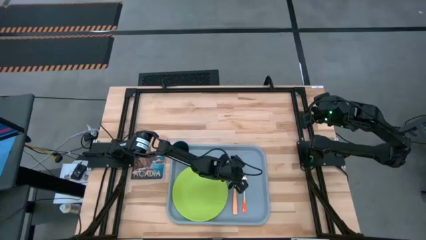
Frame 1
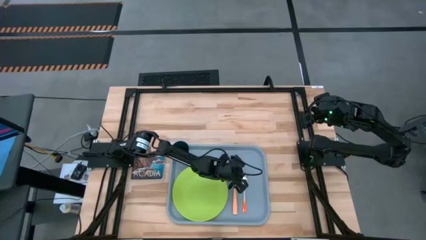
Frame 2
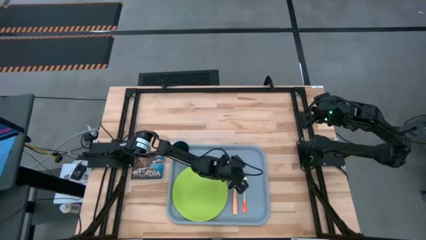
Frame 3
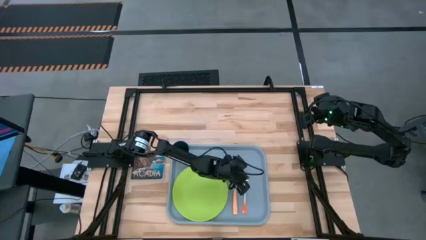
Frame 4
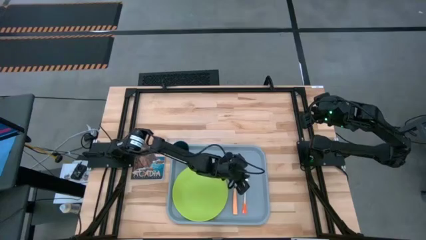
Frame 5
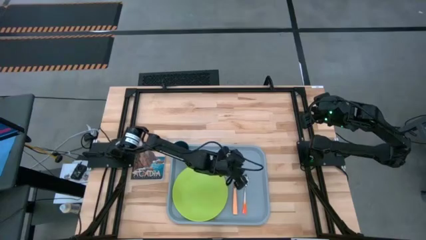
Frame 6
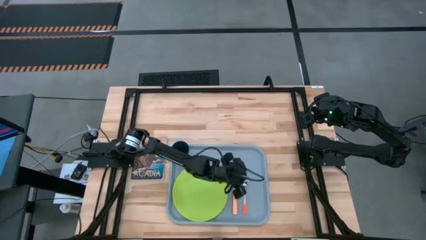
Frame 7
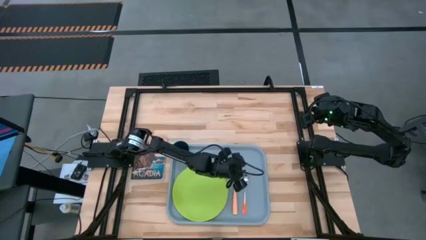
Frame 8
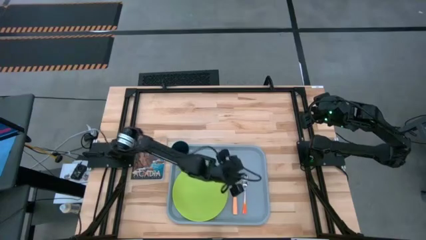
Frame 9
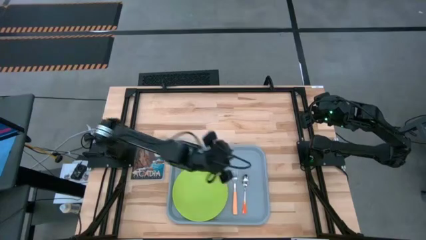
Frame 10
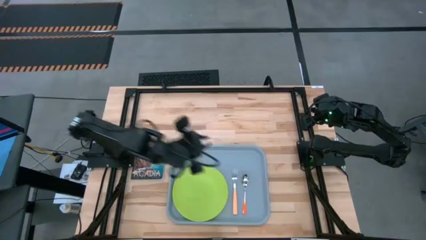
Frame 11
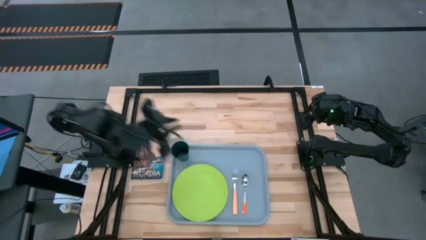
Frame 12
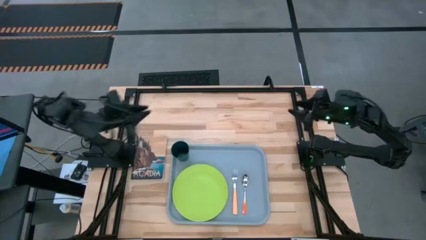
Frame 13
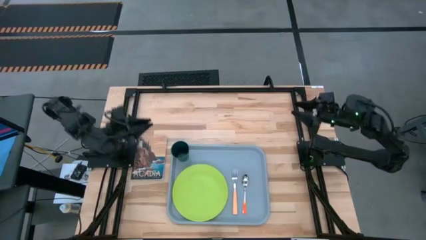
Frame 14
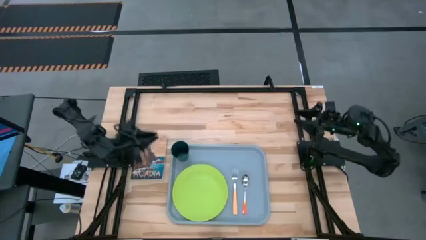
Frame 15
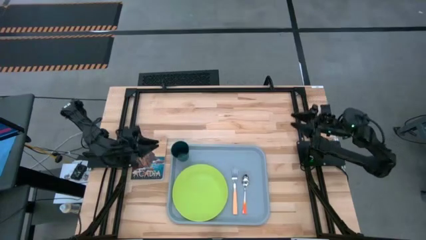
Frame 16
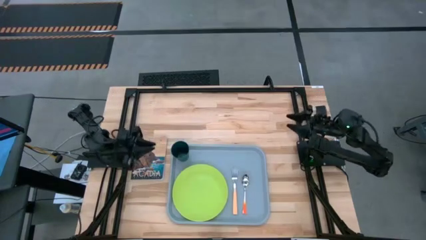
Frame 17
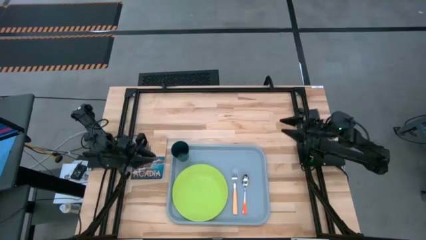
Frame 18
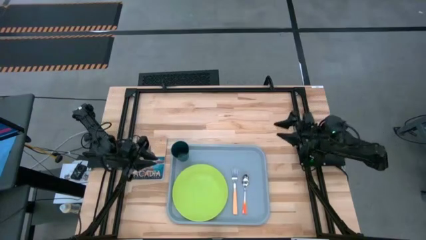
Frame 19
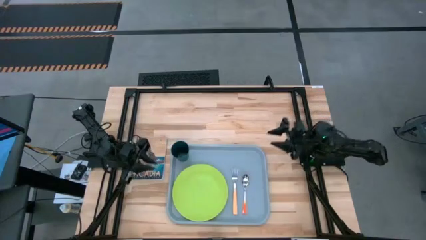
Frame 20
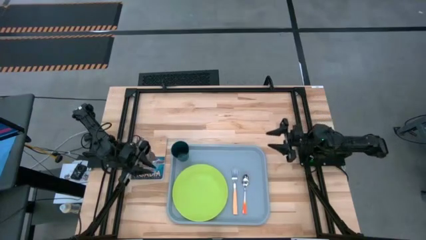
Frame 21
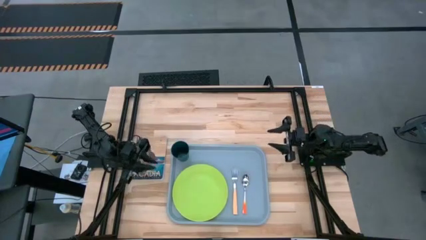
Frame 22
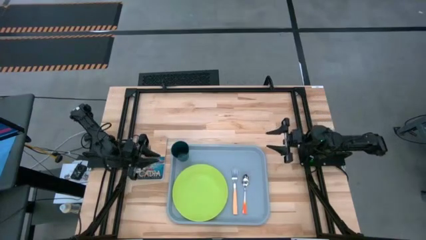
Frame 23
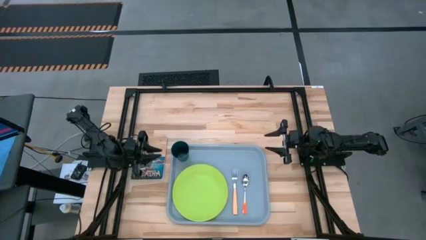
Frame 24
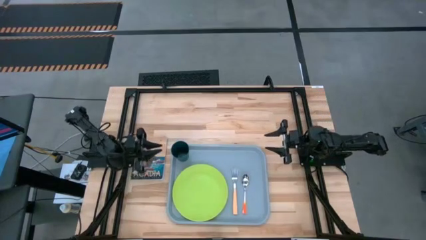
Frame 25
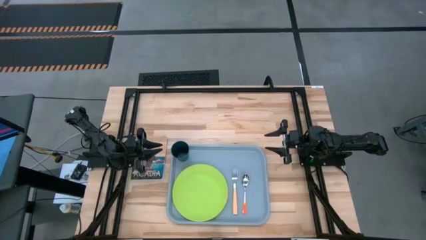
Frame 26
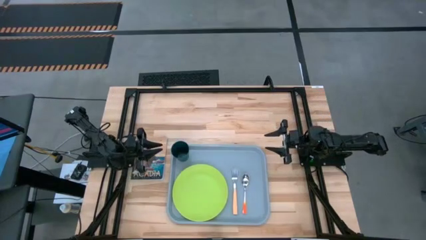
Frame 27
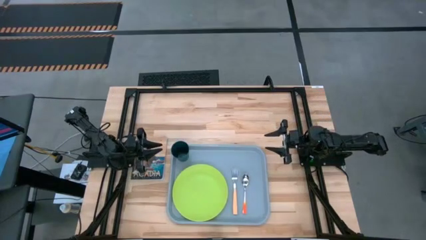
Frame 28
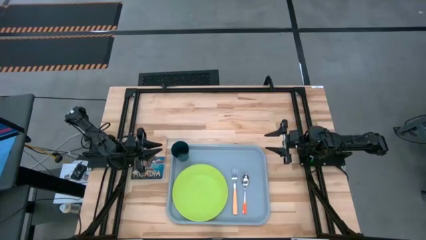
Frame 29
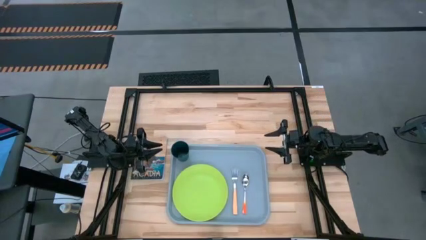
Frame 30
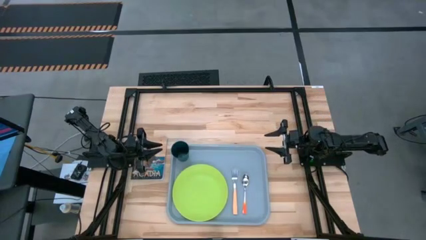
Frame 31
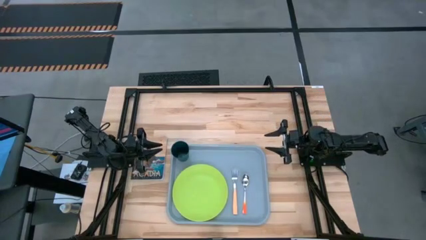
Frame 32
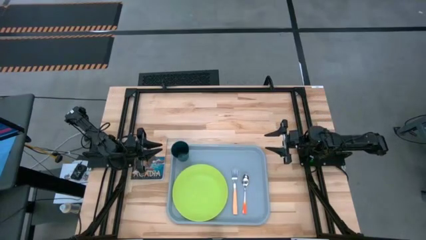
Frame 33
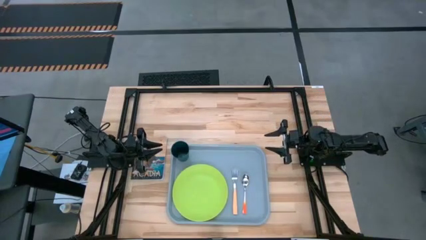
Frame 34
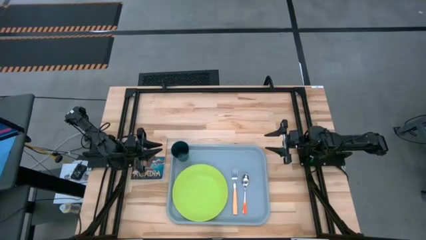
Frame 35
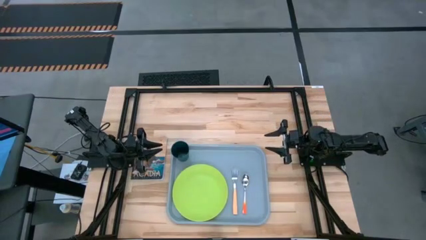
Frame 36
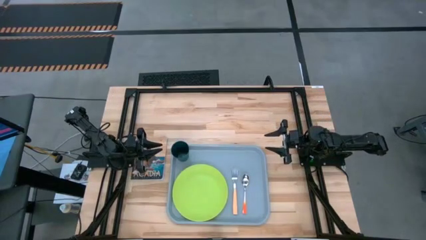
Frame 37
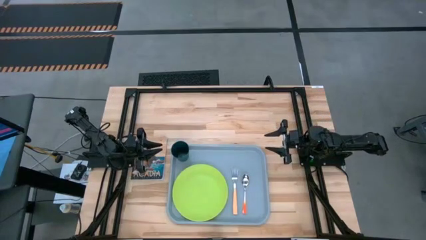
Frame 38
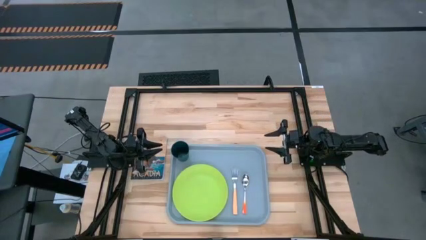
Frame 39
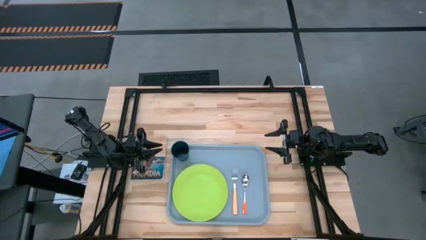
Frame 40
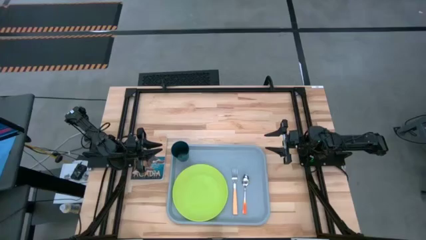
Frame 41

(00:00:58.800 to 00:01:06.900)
Task: Pick and place plate/cup/fork/spoon on tray
Return to Home Position

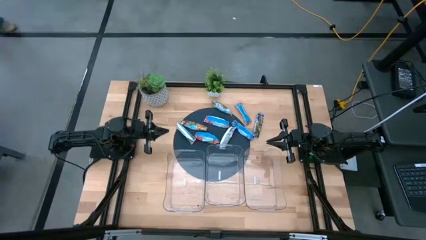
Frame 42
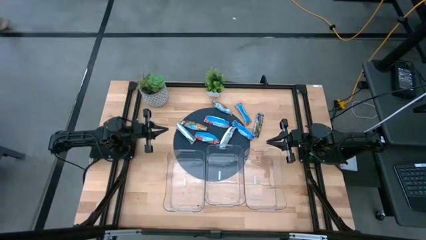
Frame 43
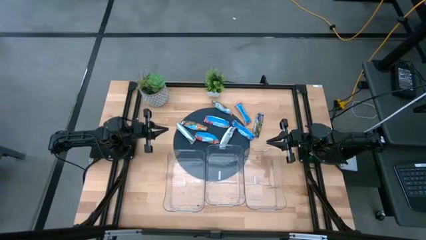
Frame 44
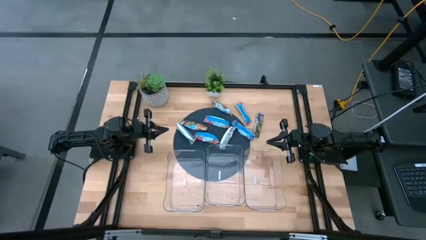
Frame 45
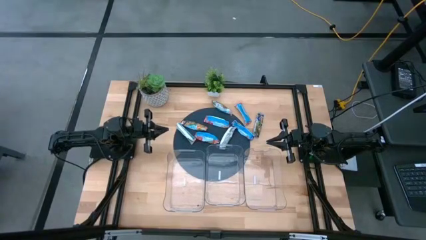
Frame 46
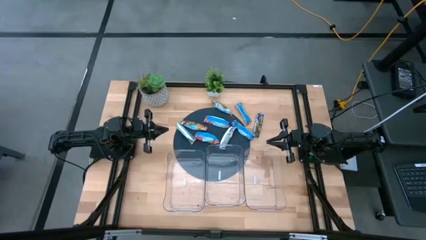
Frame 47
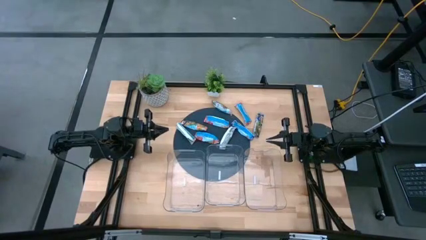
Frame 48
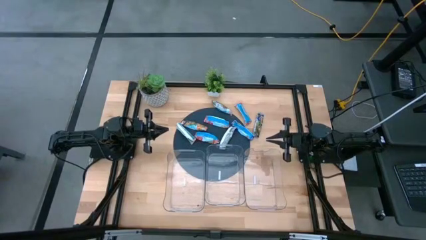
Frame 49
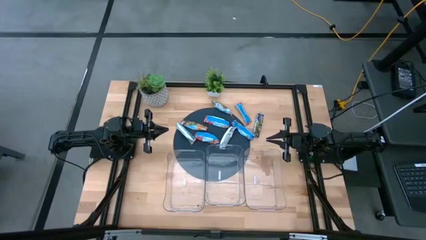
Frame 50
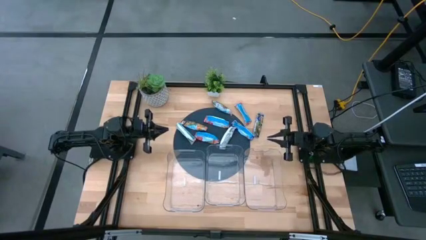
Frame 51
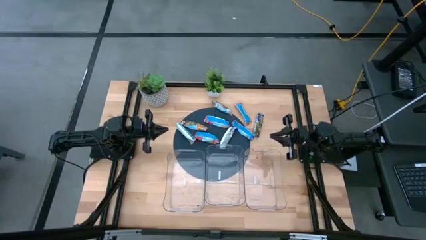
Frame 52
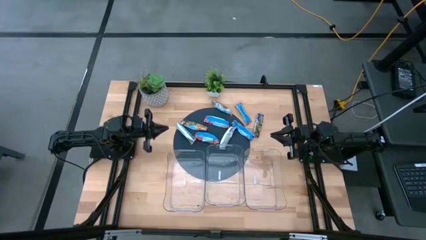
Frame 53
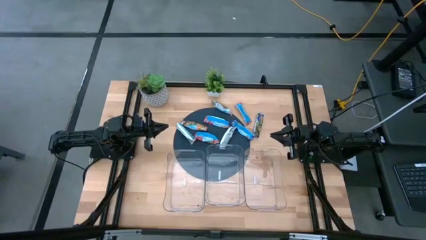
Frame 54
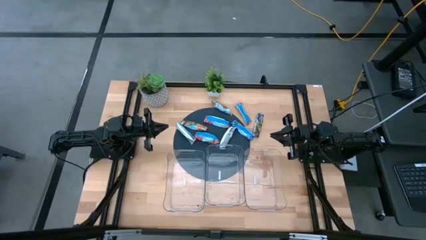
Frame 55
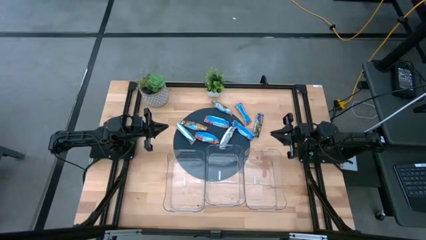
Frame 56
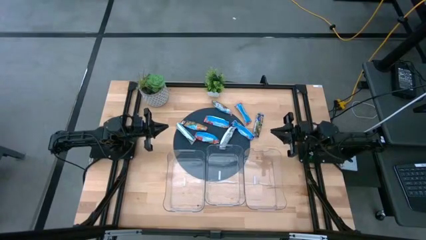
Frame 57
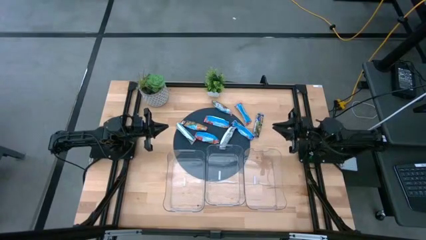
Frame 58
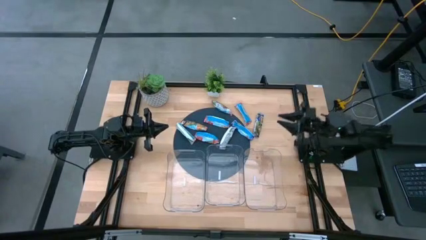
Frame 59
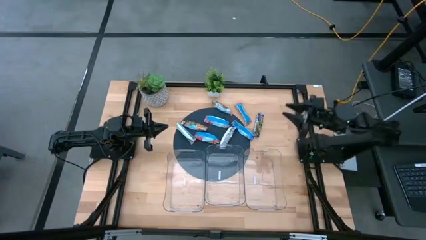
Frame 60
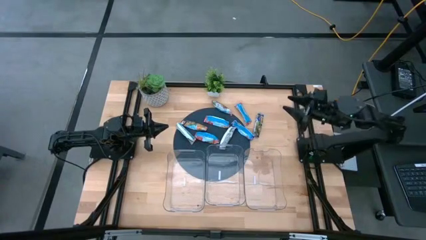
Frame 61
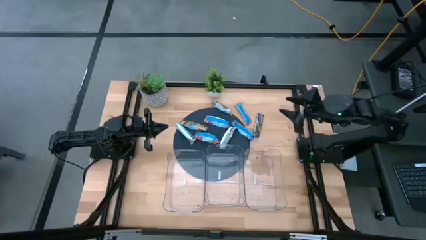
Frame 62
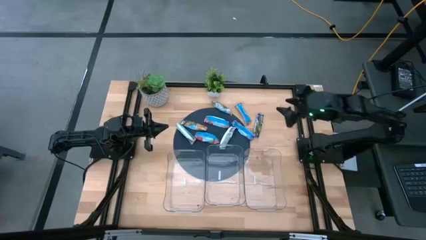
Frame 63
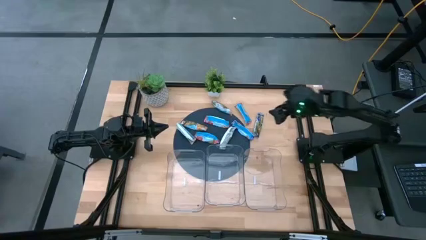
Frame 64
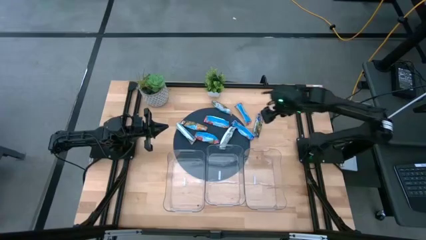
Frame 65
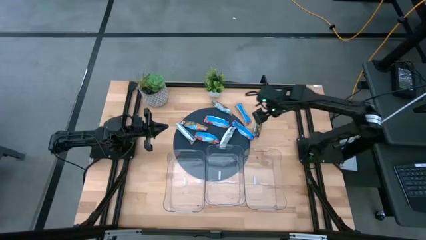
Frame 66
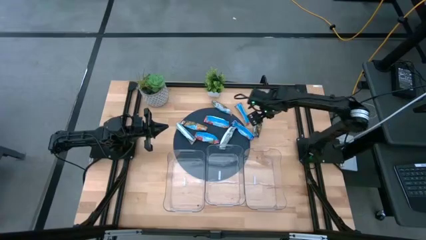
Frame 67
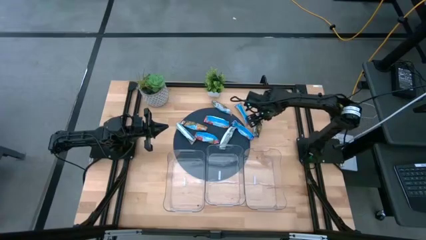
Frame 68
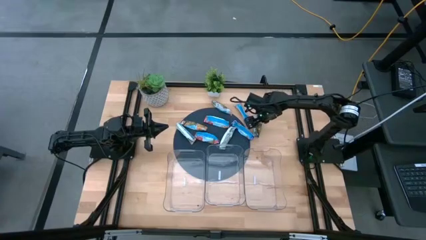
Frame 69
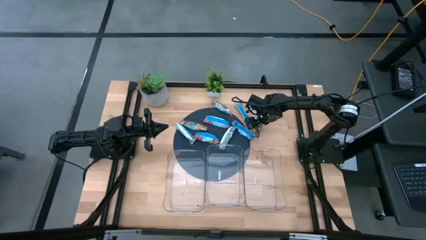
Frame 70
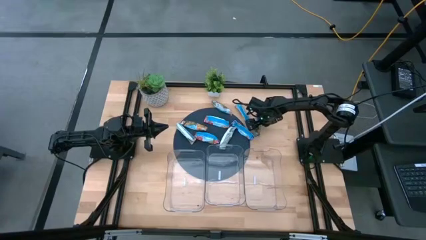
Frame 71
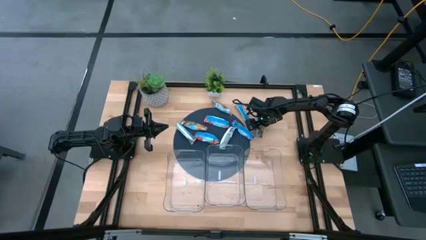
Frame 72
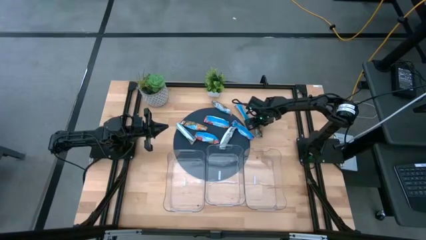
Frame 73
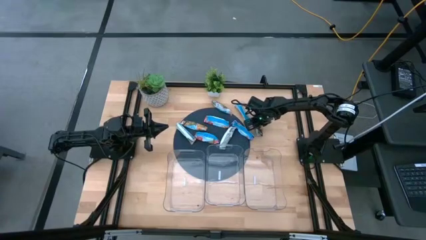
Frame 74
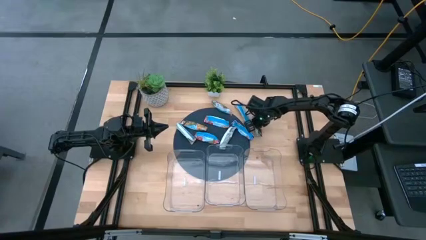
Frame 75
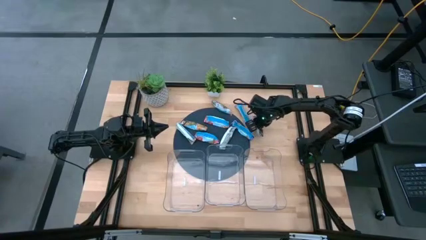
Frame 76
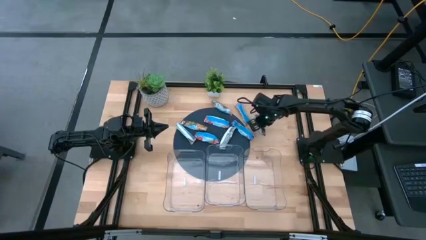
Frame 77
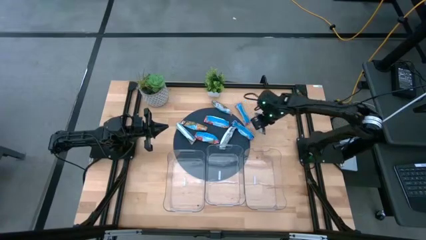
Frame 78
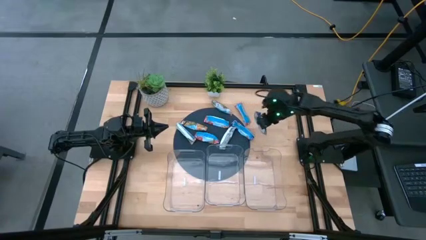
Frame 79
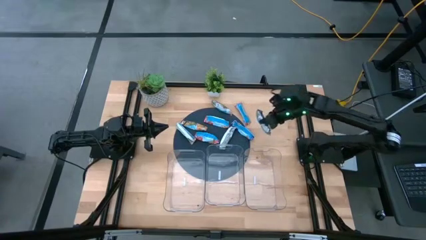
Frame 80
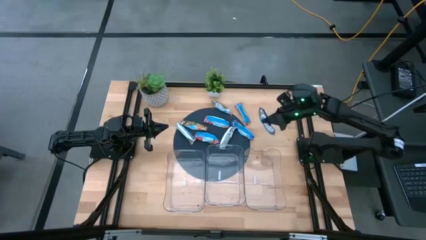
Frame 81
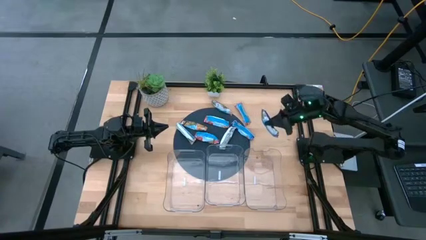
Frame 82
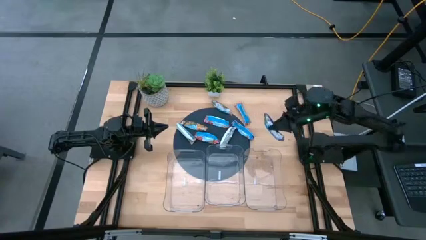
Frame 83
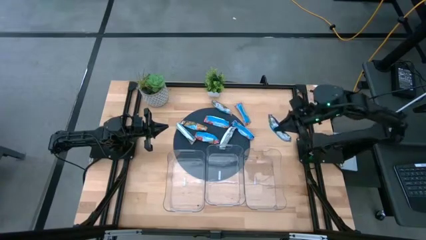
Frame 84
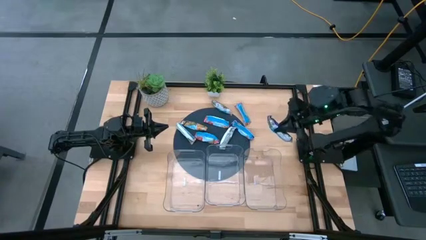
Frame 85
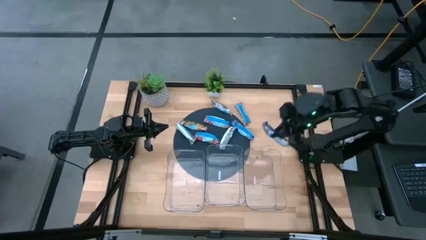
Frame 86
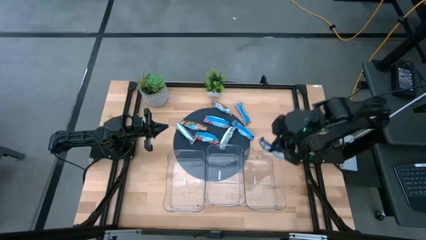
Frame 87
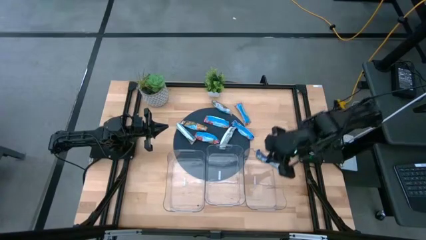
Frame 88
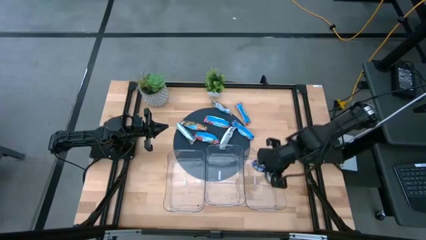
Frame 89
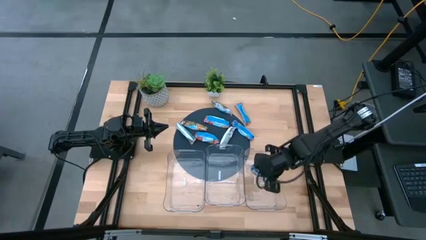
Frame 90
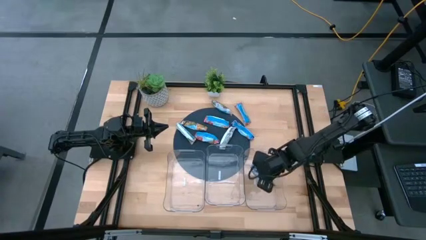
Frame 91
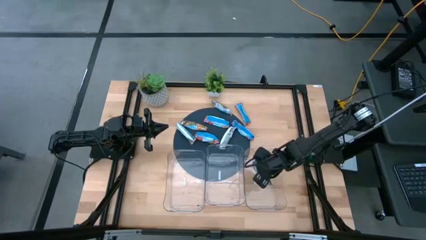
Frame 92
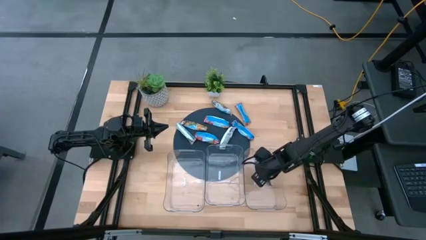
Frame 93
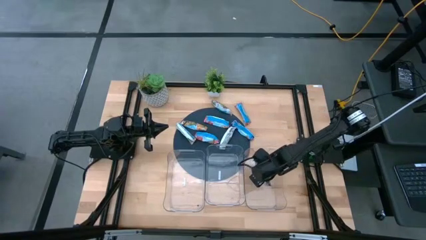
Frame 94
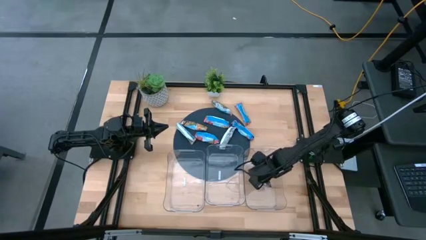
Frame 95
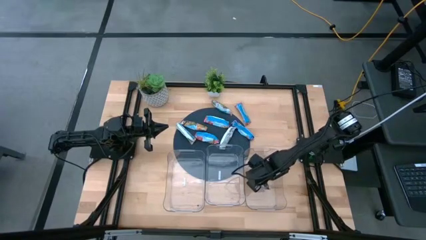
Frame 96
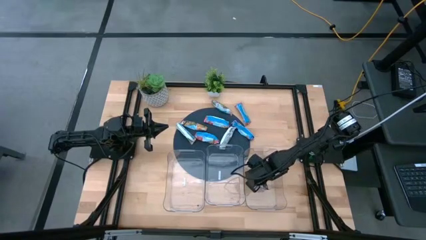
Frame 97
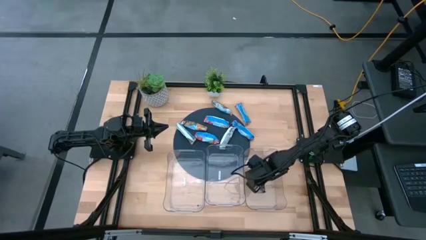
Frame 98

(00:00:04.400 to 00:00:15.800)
Task: Pick and place Granola Bars by type
Put the blue granola bar into the right transparent bin
